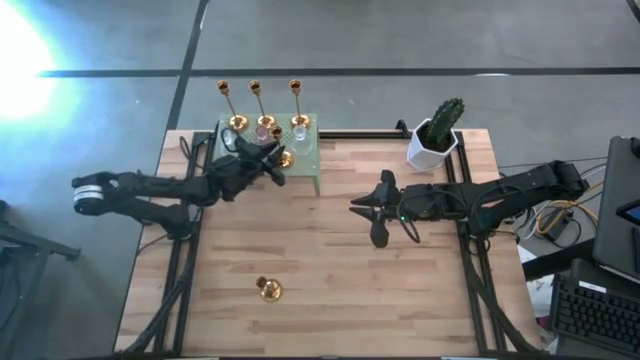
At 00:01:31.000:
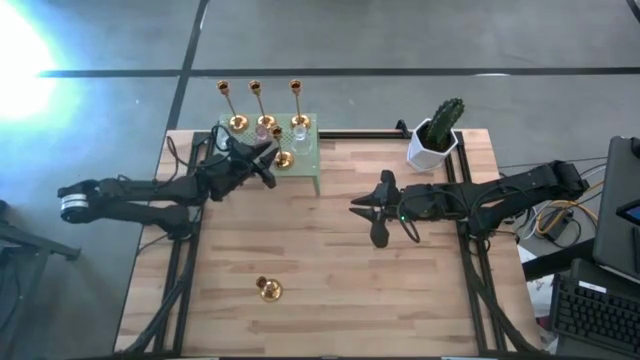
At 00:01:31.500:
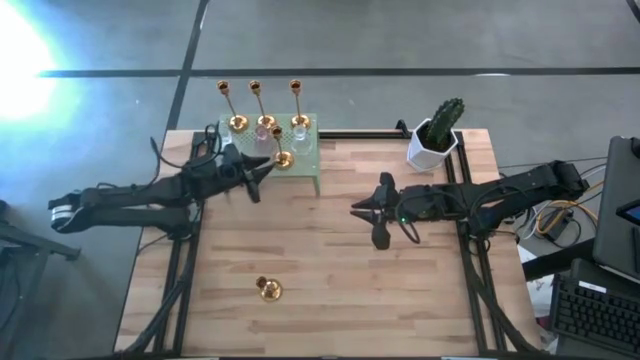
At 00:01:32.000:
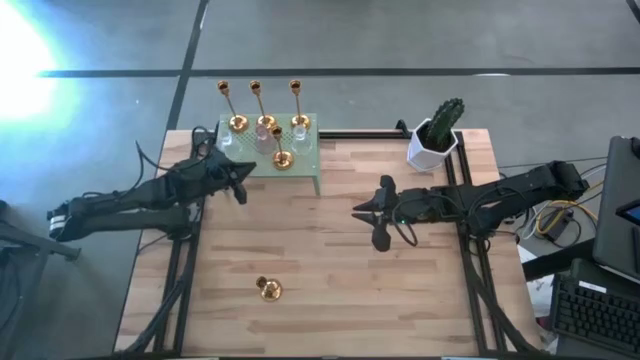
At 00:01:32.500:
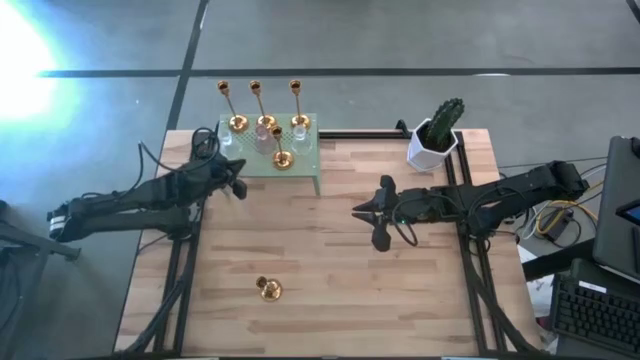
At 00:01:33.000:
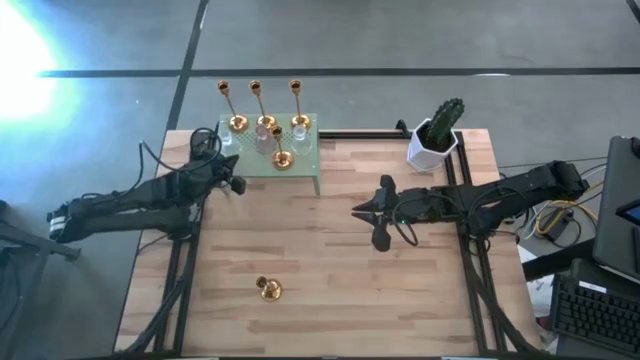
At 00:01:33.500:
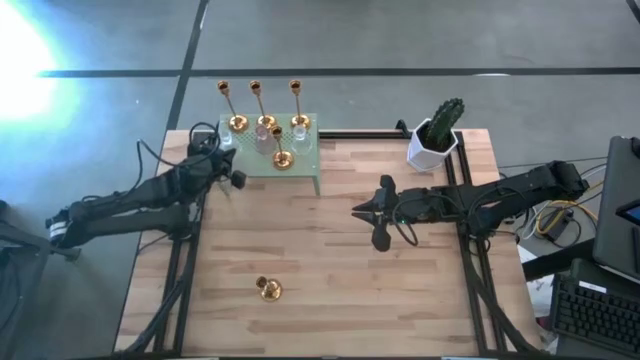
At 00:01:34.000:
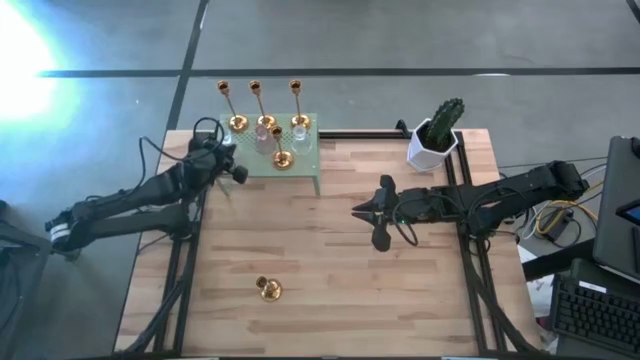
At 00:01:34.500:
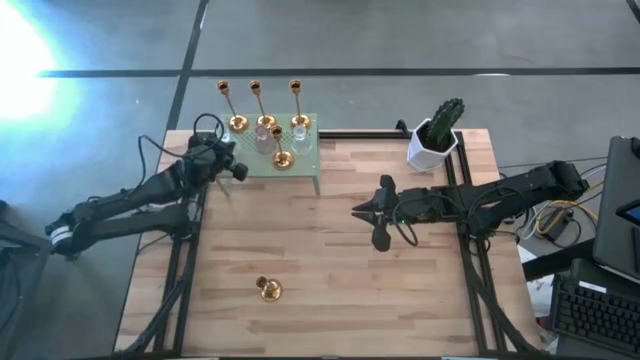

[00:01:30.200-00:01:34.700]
Task: Pick & Place candle stick holders
Adjust the transparent candle holder

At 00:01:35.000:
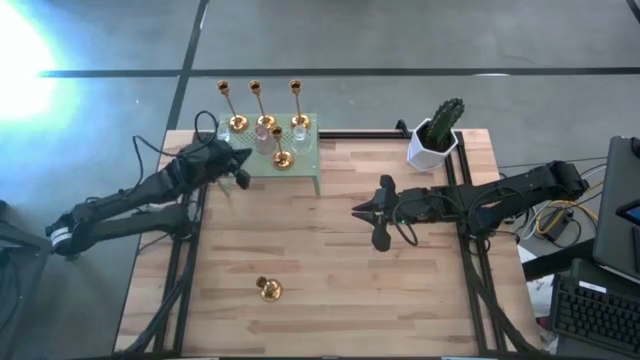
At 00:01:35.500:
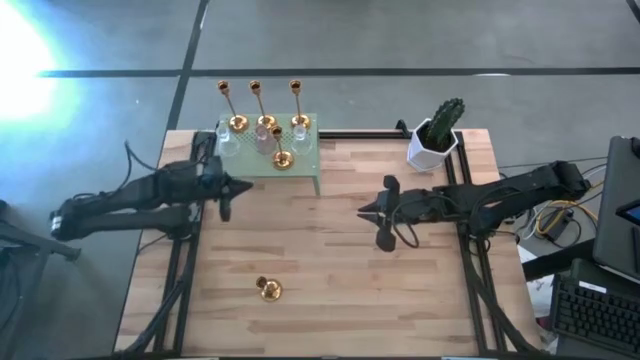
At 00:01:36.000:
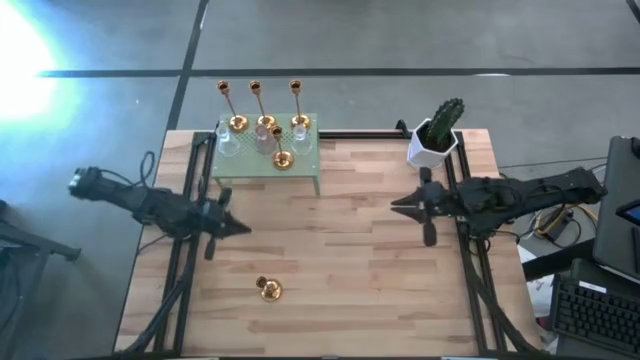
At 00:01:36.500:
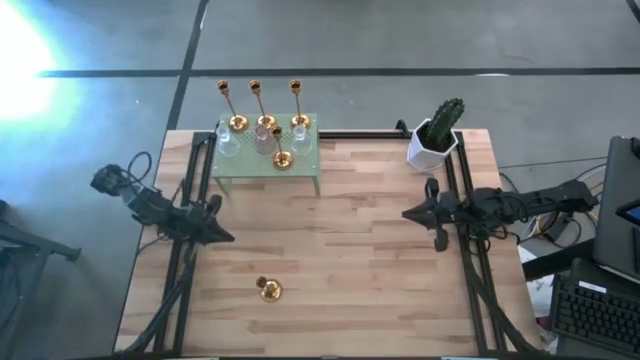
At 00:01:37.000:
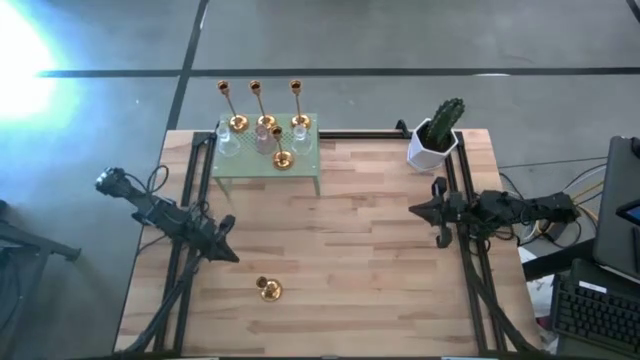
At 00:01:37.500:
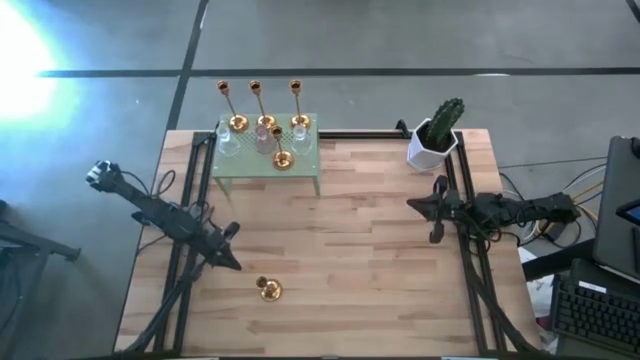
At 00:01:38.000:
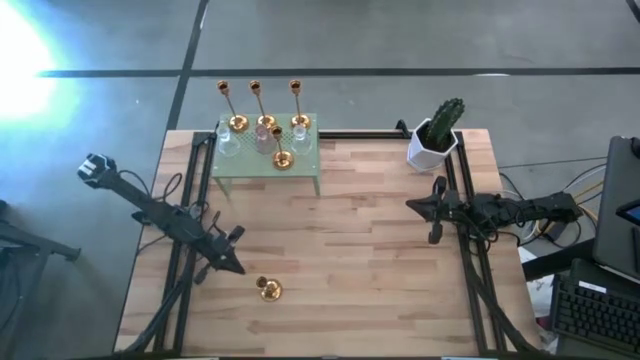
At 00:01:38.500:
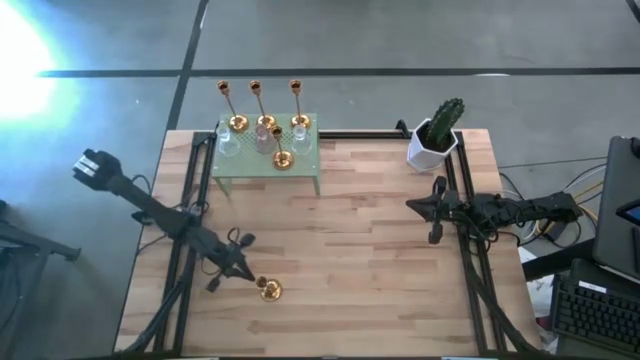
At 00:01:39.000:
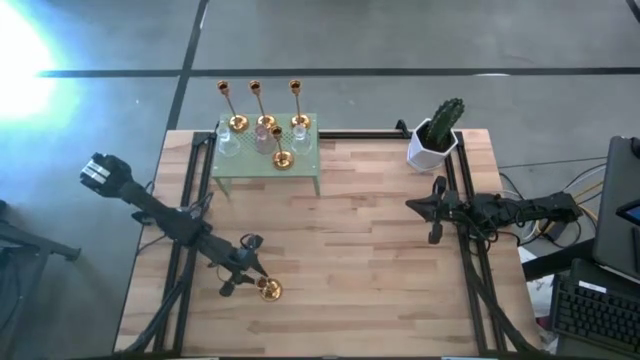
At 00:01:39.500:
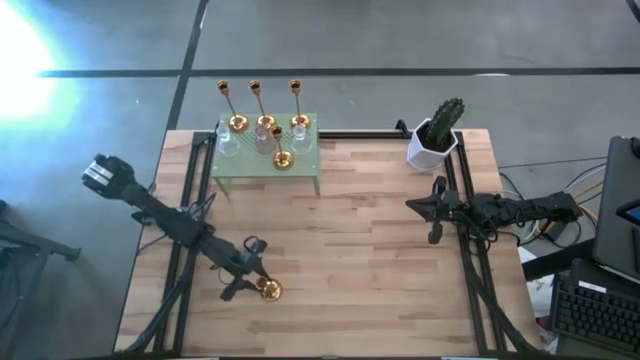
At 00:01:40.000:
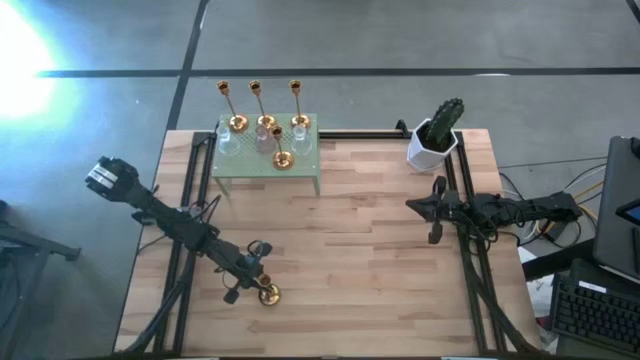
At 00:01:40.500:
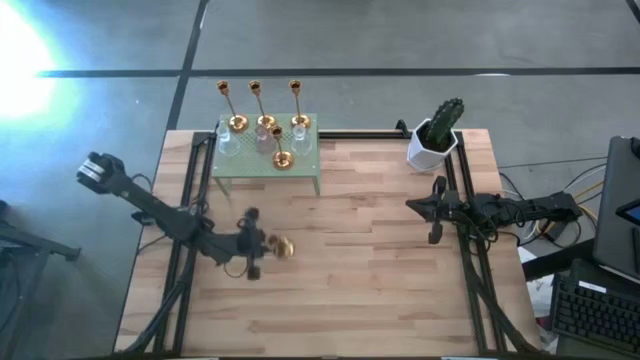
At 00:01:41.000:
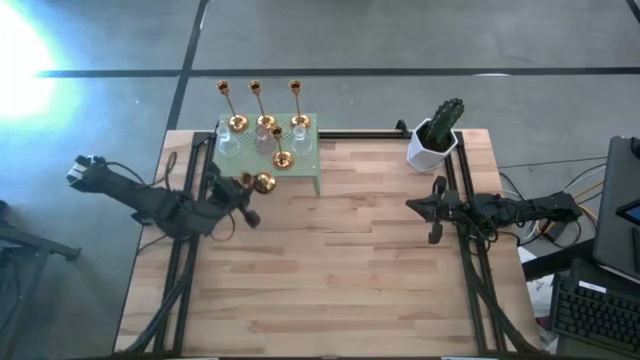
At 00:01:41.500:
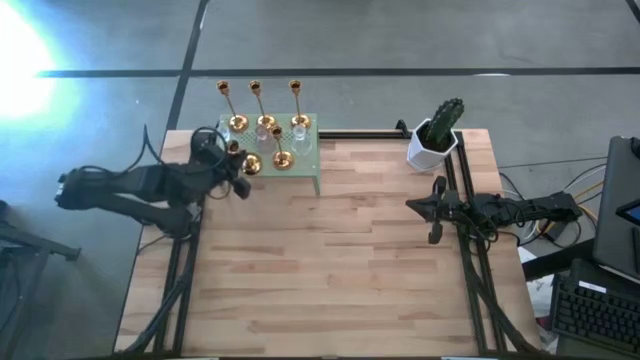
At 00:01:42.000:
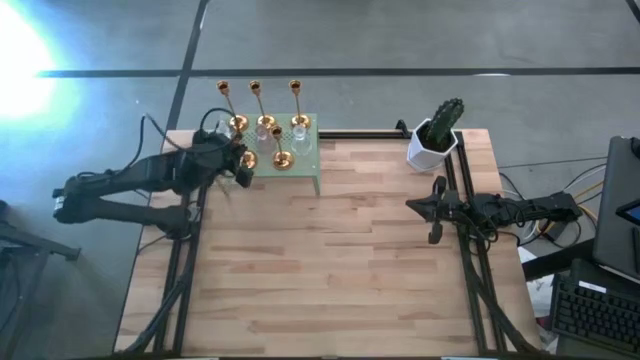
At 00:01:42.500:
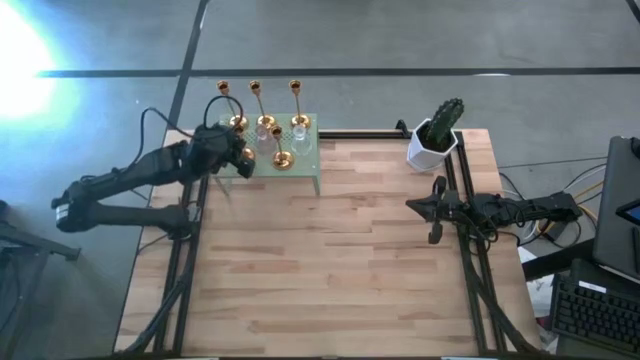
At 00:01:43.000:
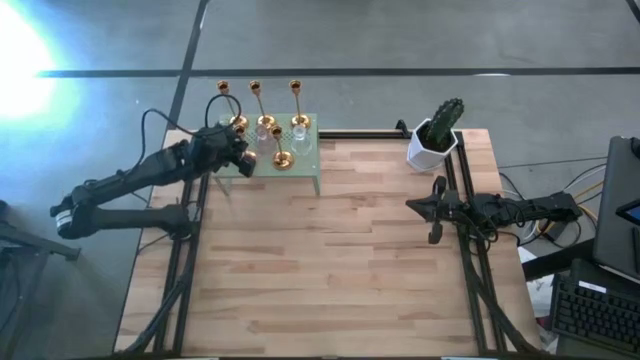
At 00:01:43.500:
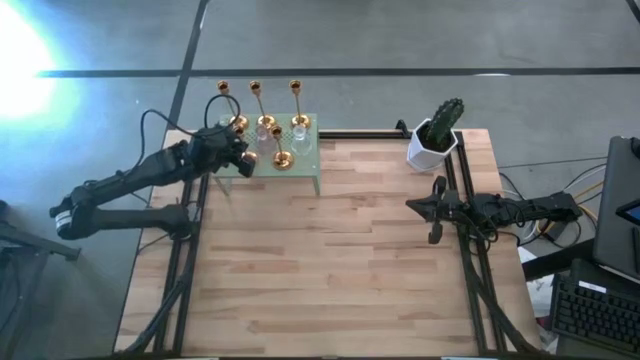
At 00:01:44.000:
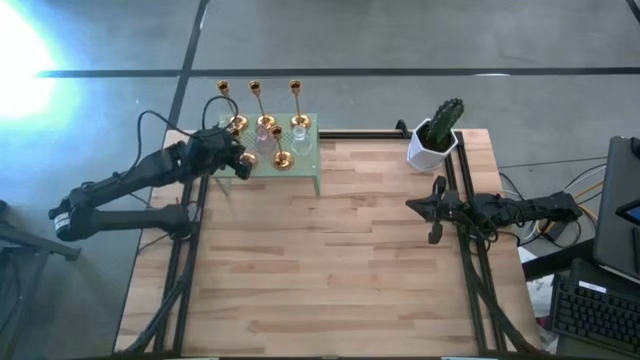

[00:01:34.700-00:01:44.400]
Put the golden candle holder on the shelf

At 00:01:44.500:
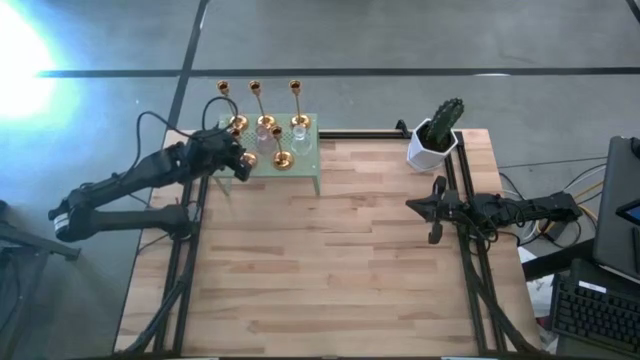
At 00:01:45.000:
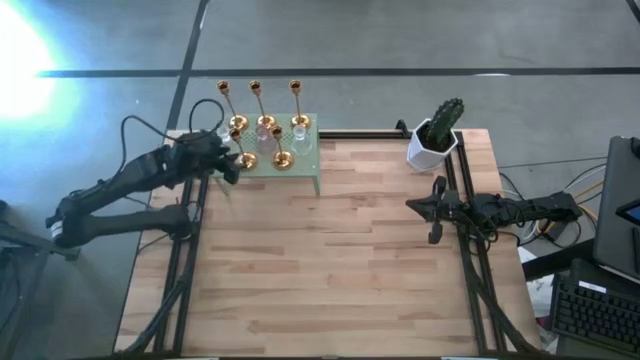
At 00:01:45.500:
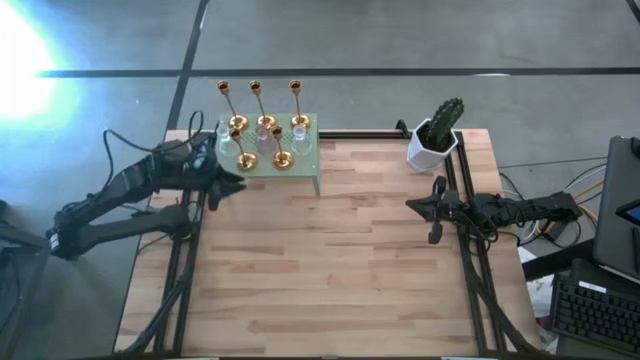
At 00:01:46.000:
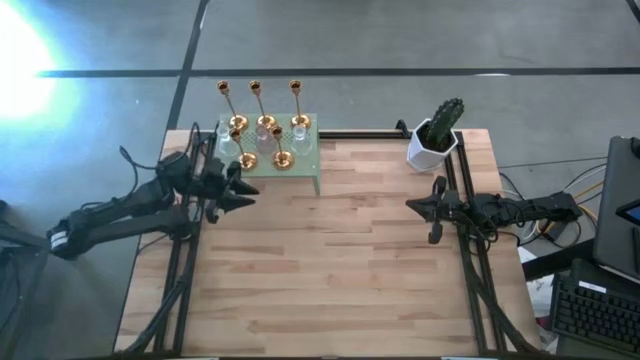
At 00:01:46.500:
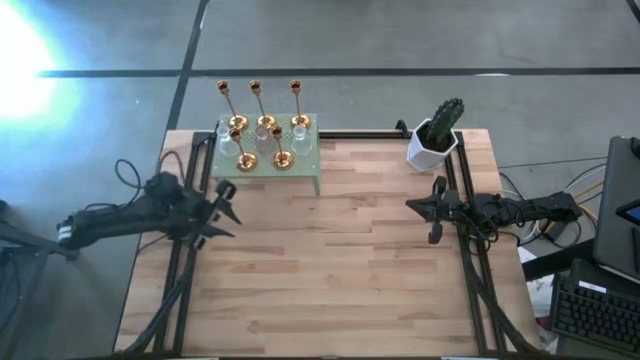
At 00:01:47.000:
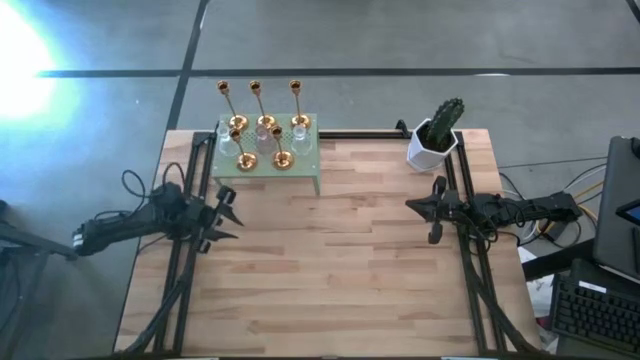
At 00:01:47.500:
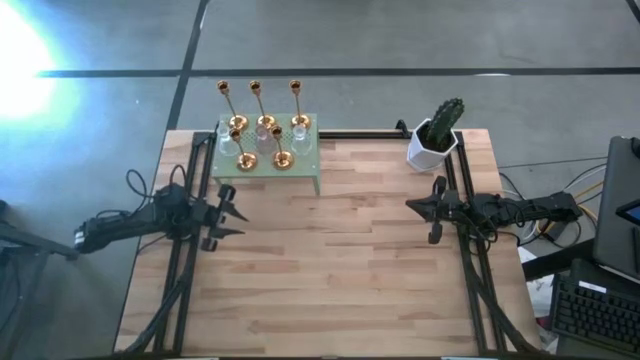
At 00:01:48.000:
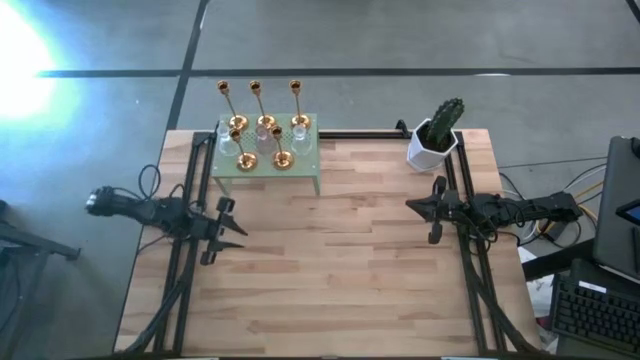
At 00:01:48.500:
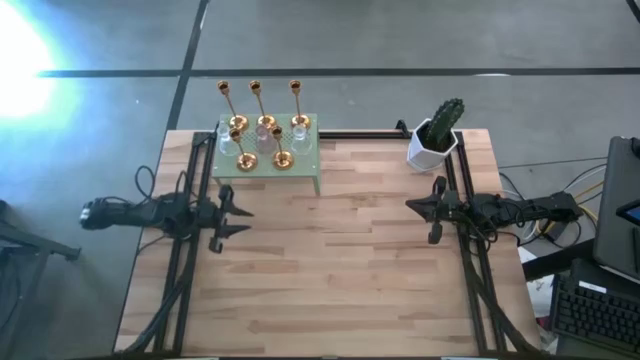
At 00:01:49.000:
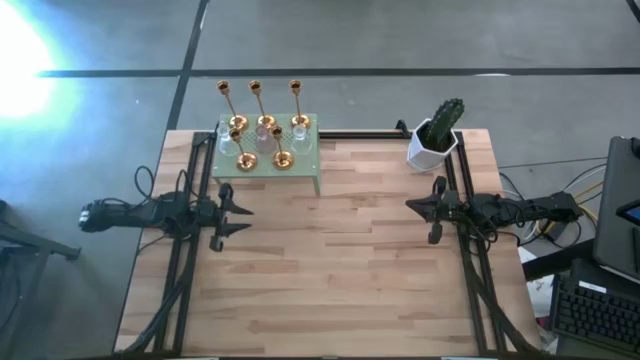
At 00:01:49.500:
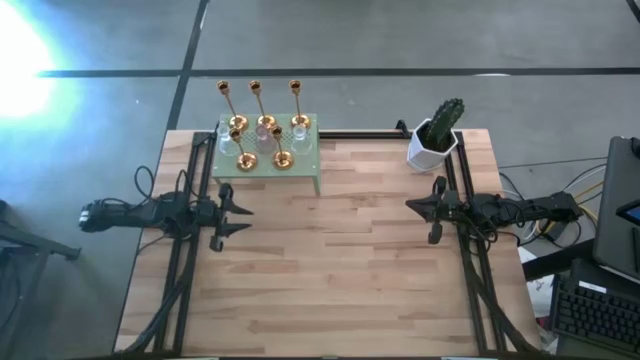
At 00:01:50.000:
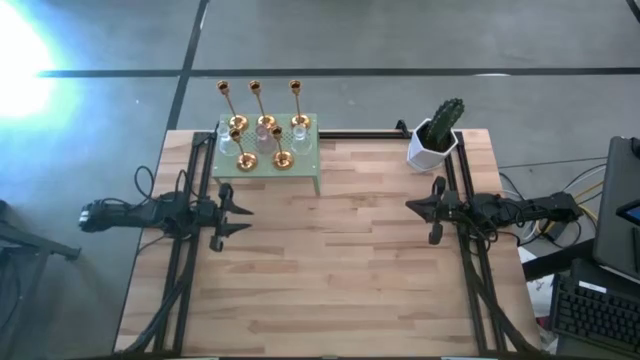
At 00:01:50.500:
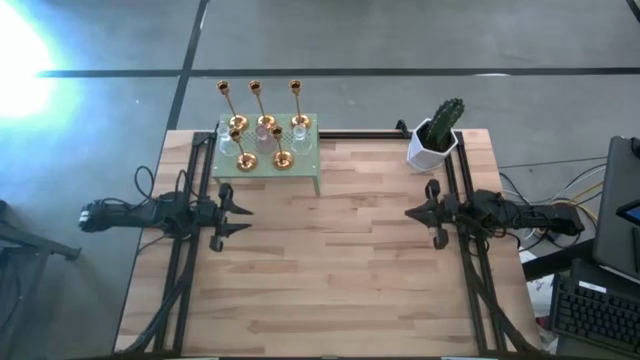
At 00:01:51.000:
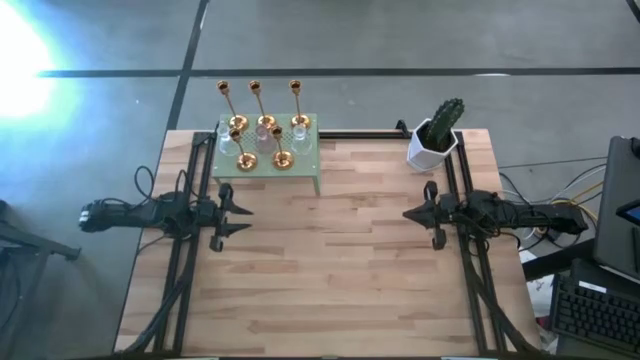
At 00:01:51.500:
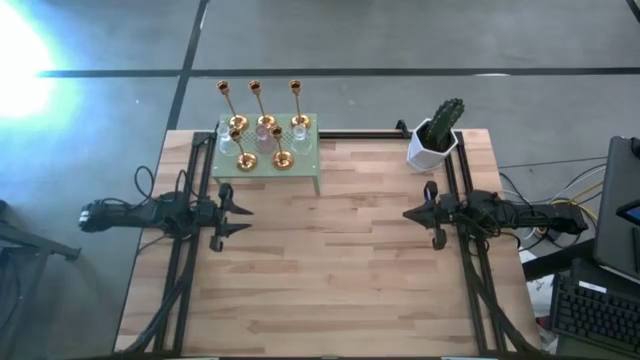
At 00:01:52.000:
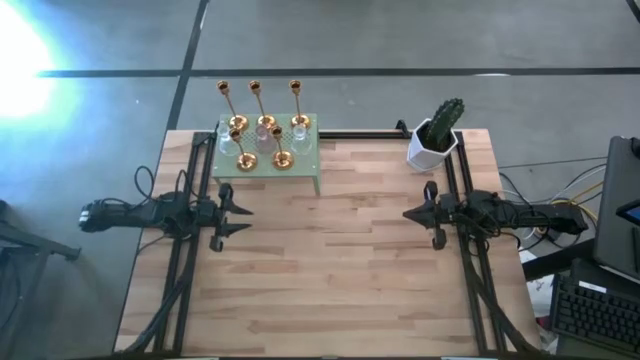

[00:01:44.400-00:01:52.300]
Return to Home Position
